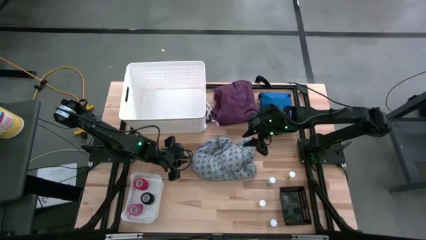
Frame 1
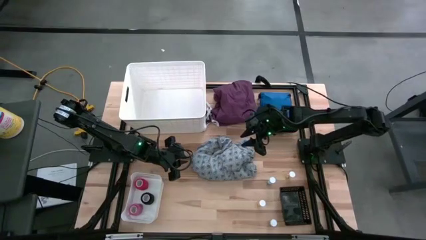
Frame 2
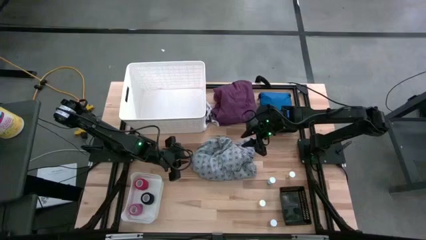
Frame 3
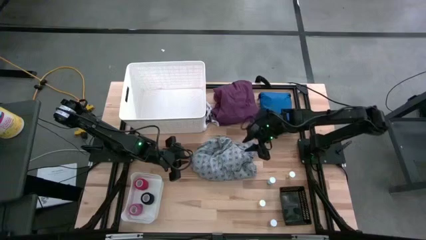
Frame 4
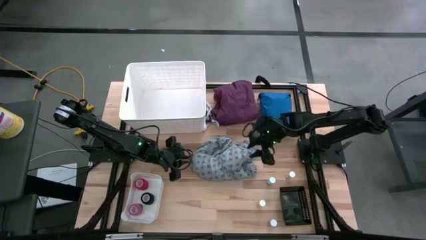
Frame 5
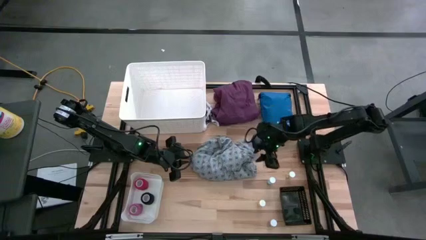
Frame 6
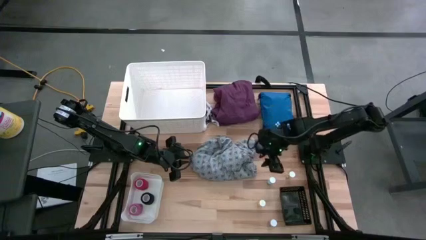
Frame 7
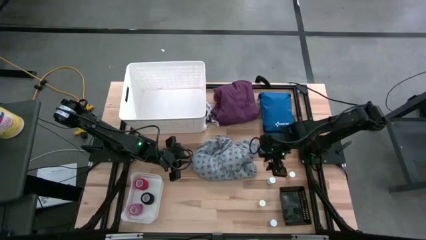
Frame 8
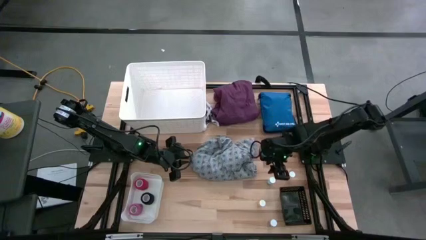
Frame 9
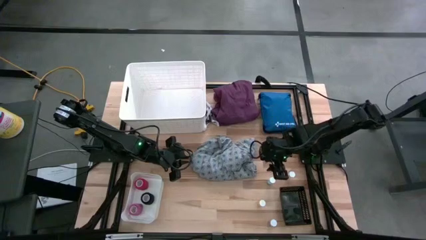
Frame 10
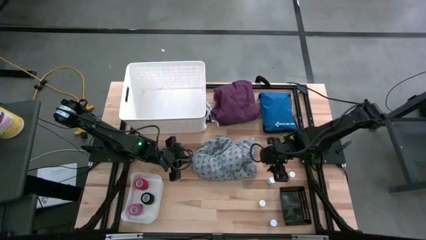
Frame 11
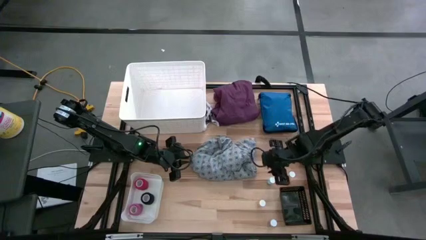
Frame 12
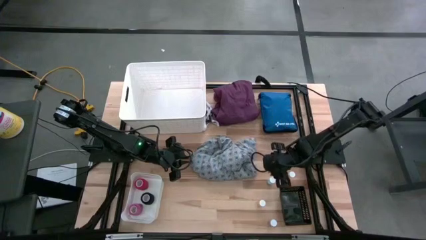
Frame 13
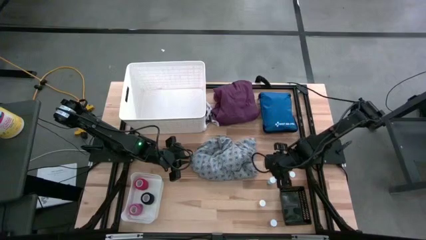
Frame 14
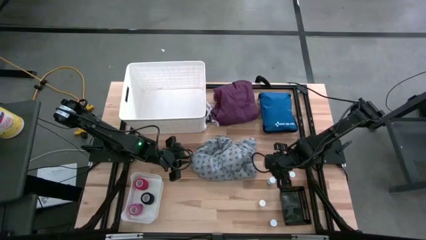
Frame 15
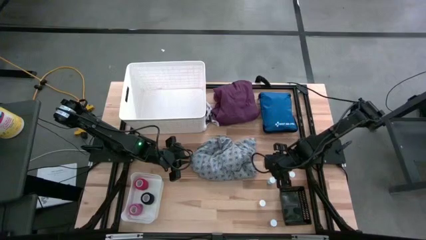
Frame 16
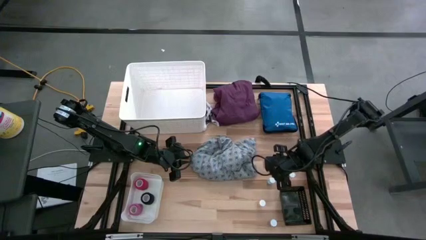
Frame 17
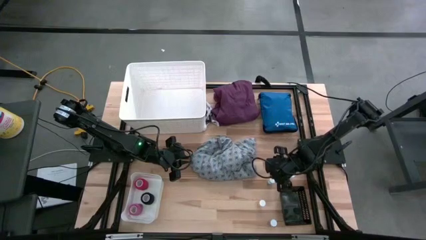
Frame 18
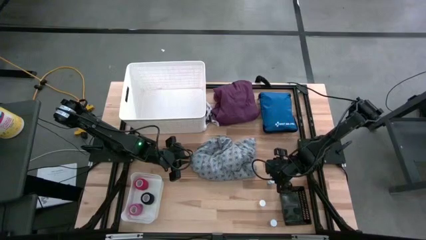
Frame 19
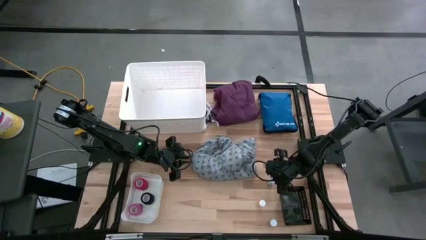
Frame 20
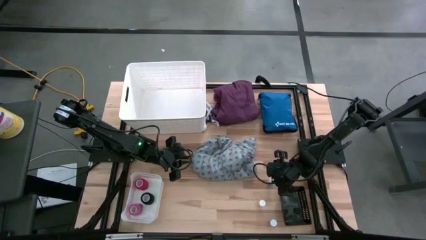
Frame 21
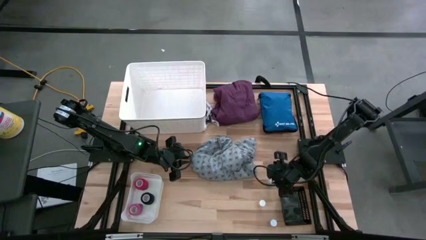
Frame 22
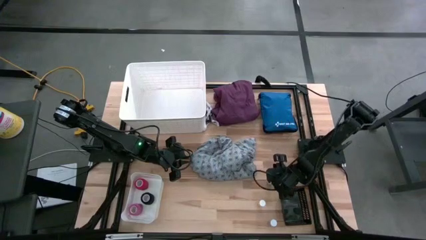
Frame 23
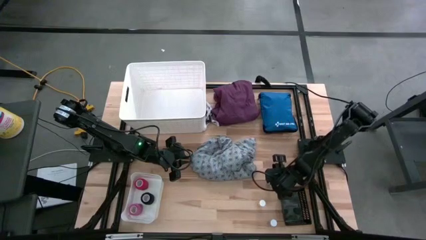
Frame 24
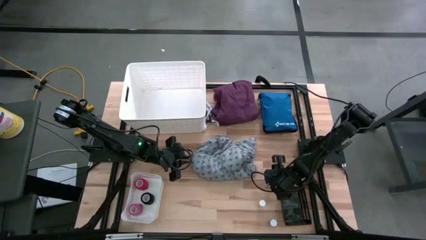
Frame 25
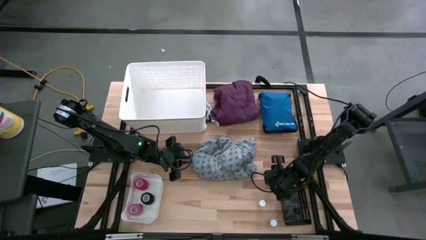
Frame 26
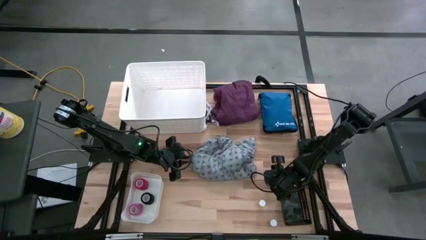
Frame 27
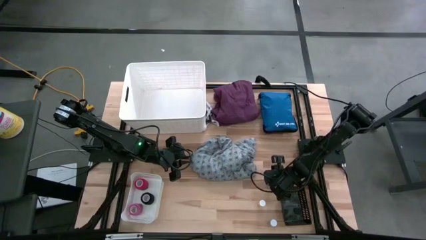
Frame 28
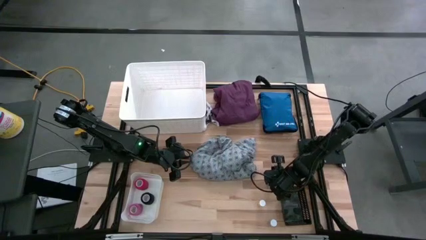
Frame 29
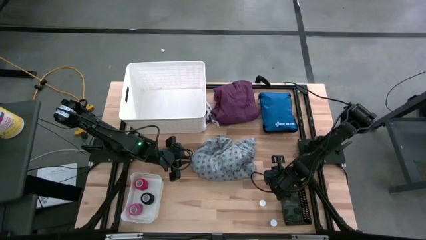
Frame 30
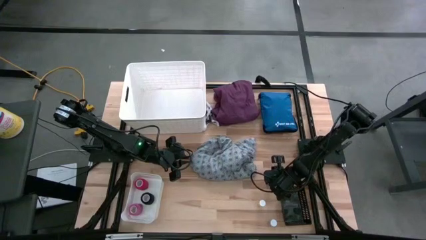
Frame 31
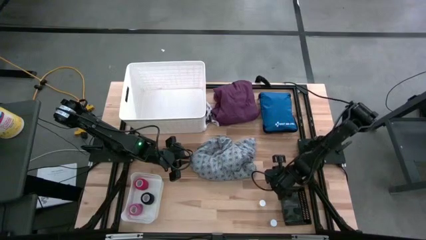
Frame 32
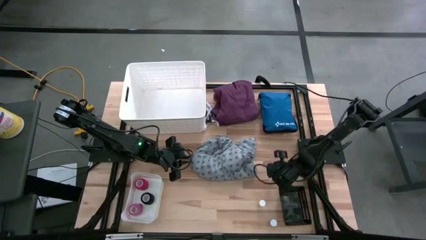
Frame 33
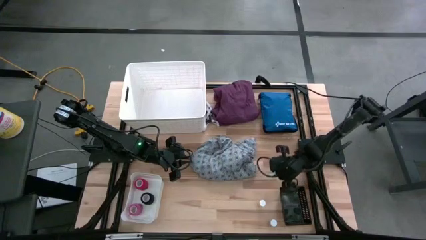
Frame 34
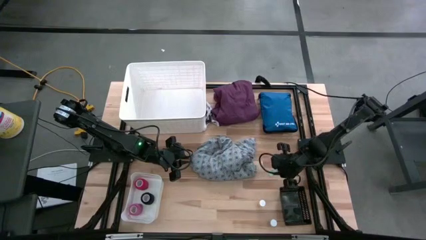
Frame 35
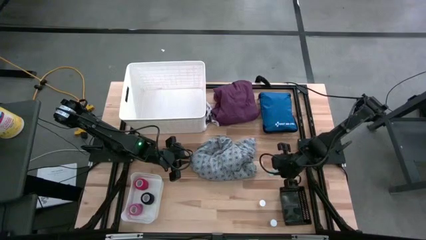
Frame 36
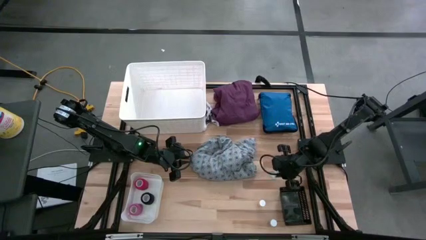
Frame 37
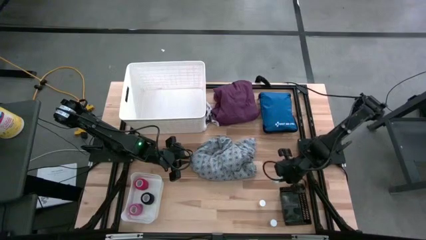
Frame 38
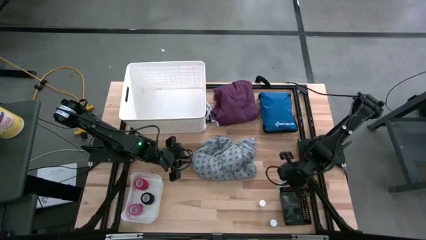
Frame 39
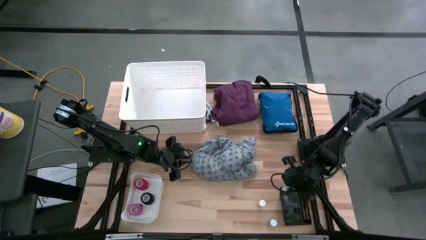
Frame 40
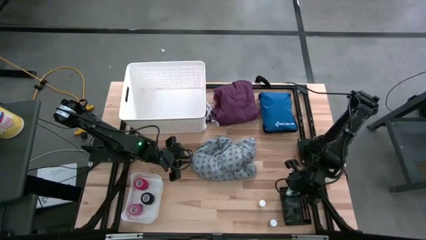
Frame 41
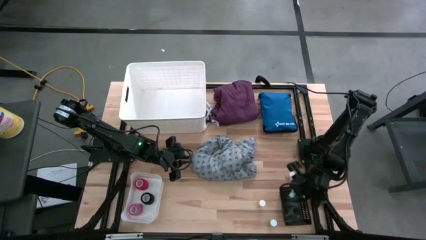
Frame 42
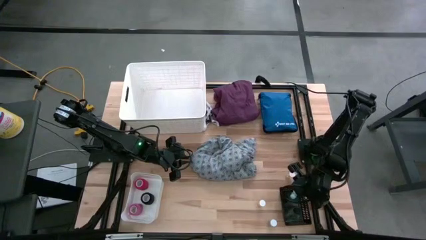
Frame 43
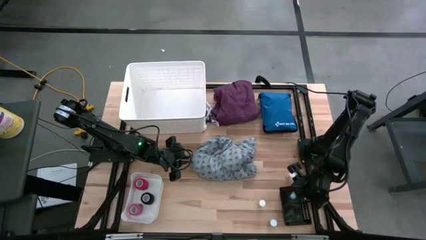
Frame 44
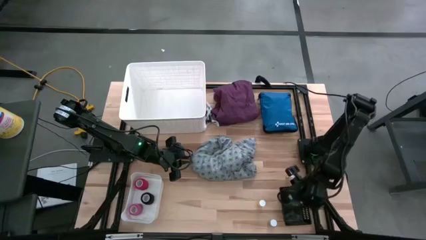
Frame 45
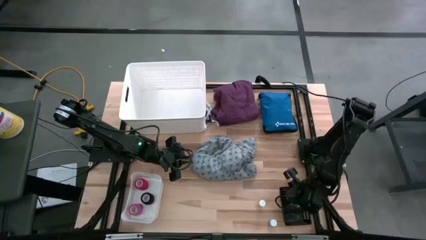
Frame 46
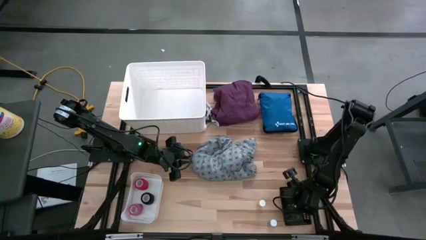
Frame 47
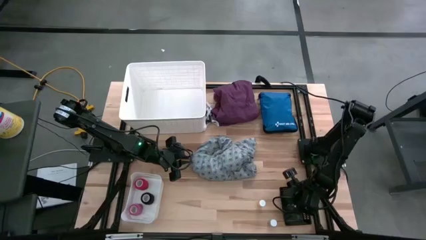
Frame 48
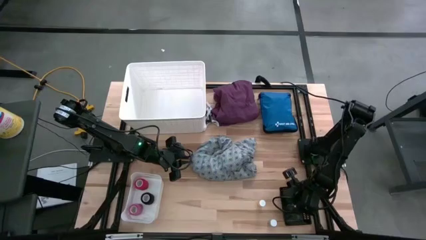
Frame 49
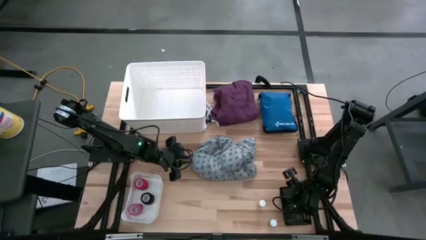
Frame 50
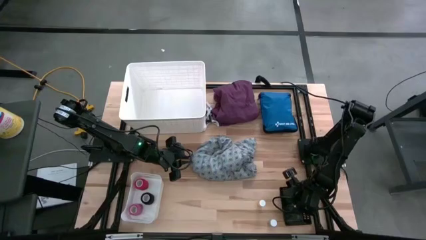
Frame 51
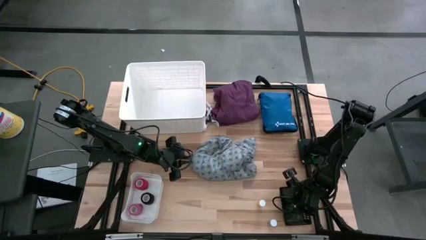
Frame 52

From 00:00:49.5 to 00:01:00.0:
Task: Pick & place medical supplies in basket/bin
Put the top blue pill bottle into the black bin

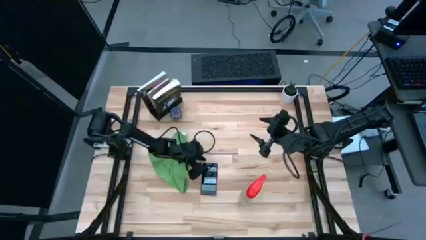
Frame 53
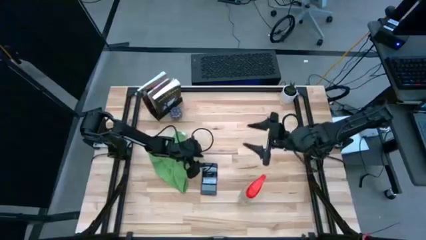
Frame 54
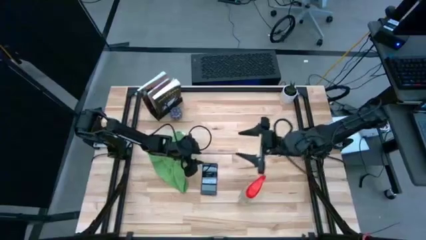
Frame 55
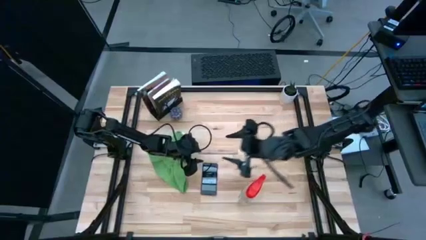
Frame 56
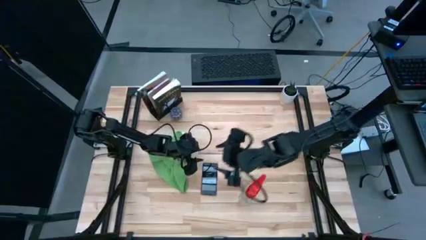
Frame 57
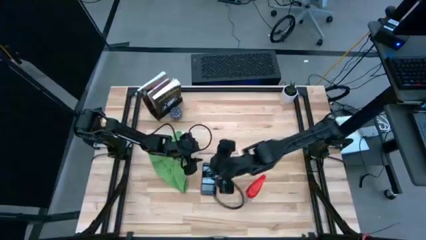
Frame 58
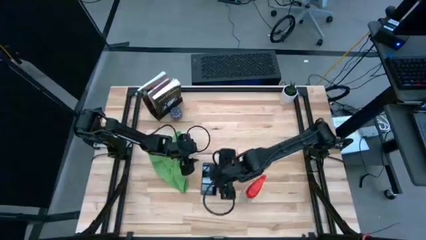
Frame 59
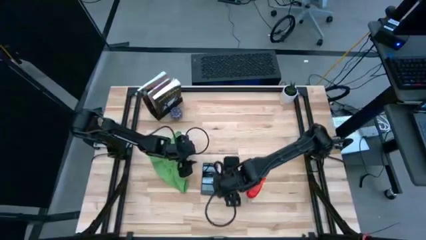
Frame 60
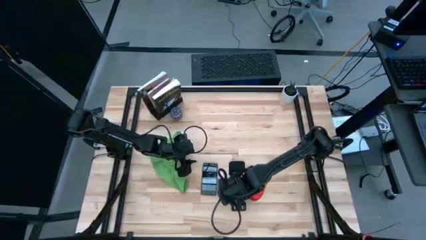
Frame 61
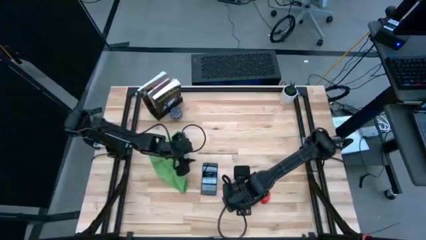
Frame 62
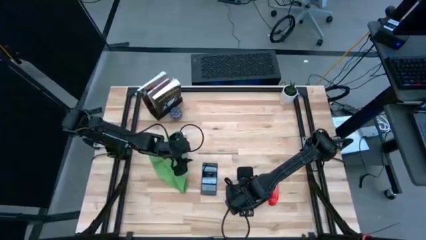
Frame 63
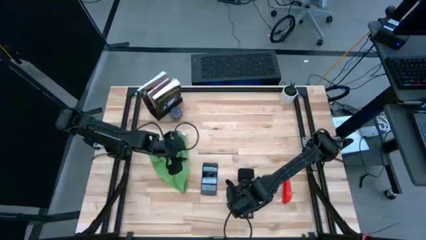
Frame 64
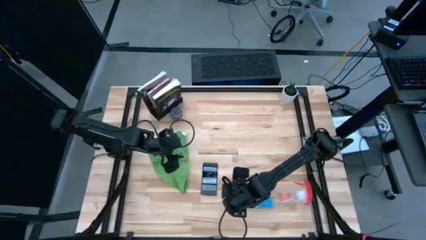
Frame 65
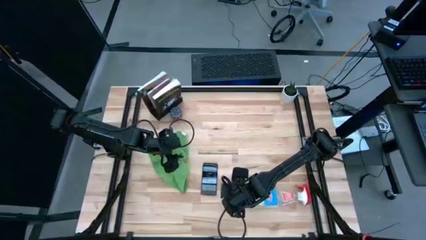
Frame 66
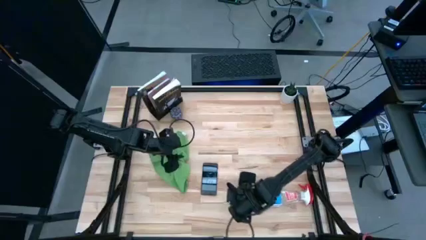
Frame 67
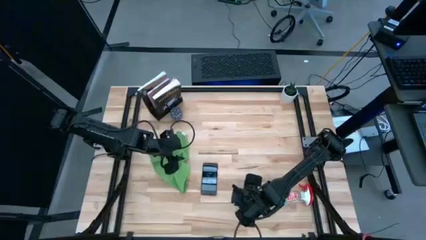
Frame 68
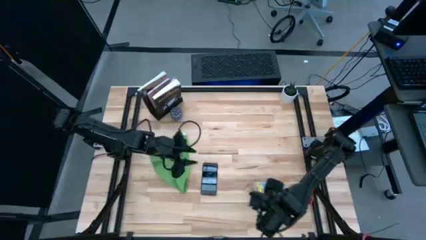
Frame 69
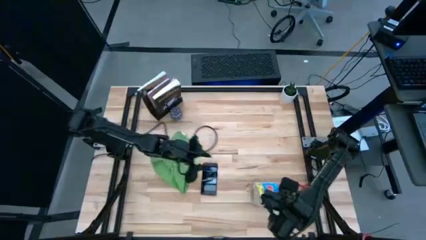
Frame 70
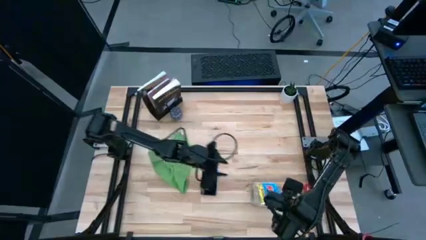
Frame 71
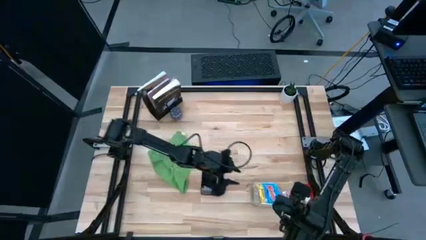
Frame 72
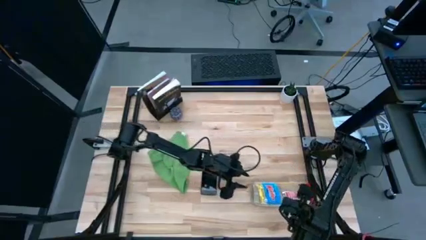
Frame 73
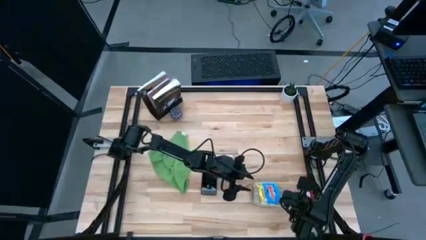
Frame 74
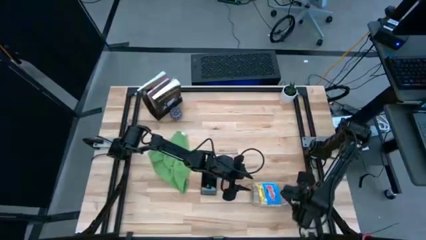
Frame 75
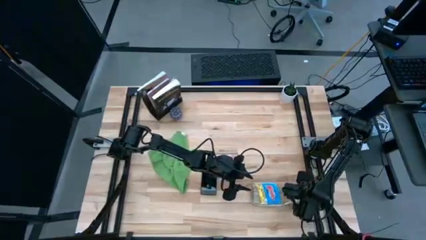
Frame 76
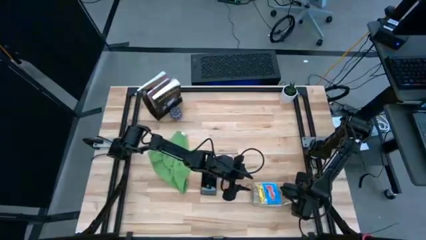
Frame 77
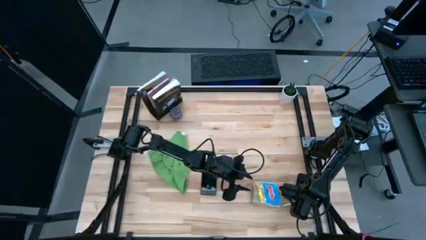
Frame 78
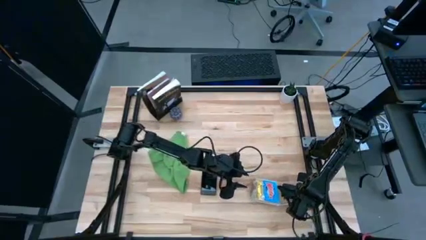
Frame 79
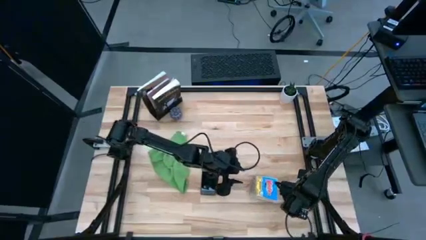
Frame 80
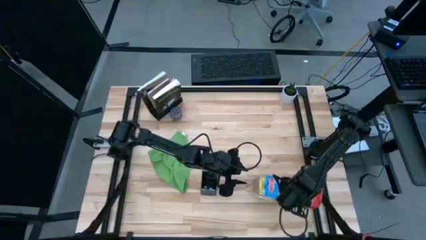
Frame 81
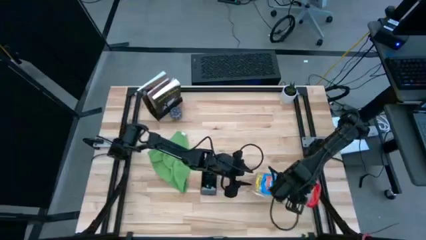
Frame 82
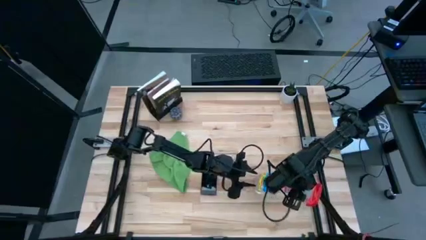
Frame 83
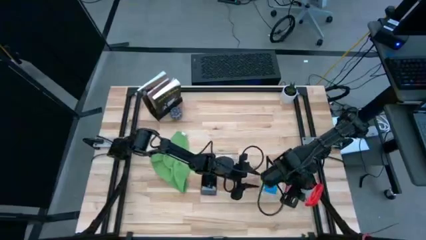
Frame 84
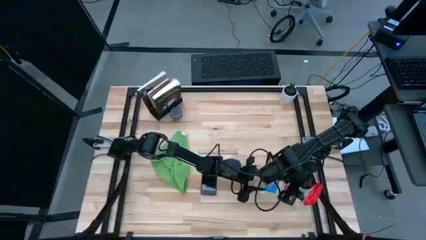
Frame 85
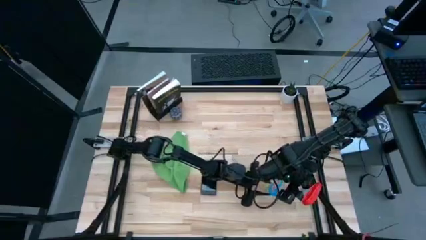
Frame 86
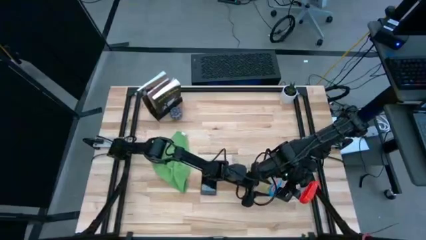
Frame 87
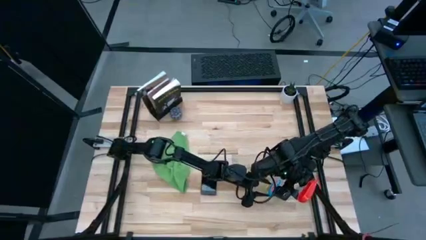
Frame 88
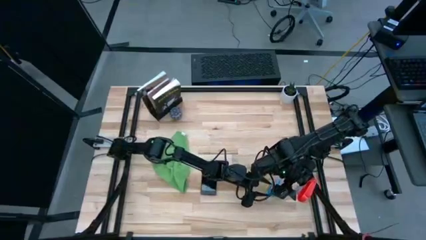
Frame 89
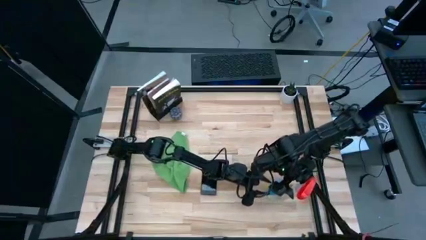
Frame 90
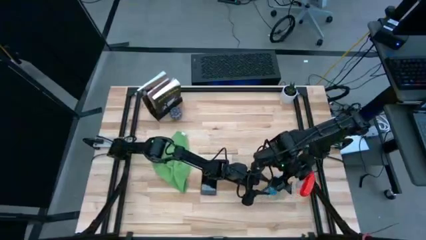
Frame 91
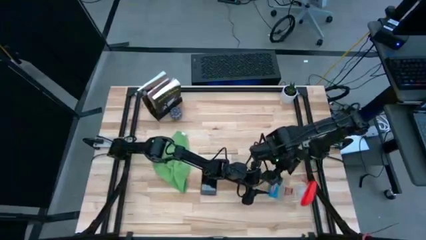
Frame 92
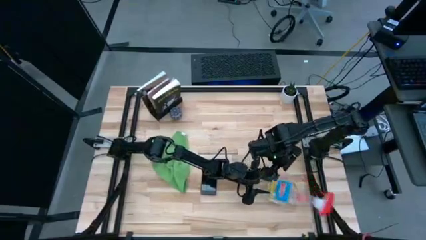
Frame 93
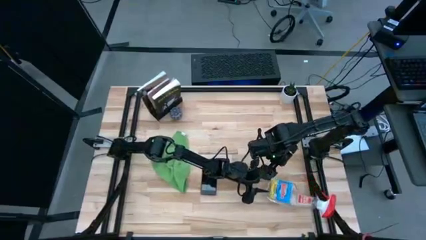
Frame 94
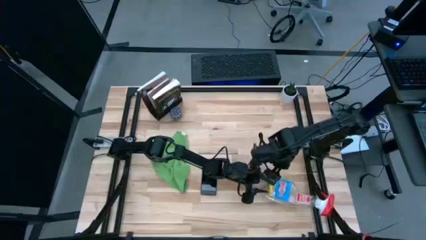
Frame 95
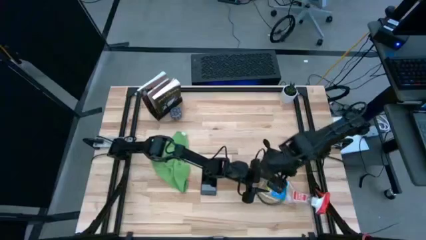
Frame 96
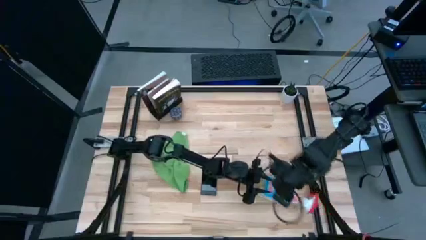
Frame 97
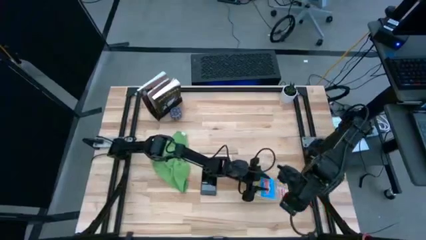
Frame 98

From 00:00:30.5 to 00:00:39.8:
Task: Apply microfiber cloth
Adjust the red spray bottle
